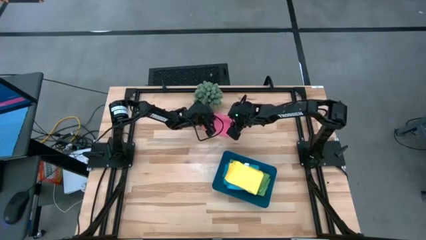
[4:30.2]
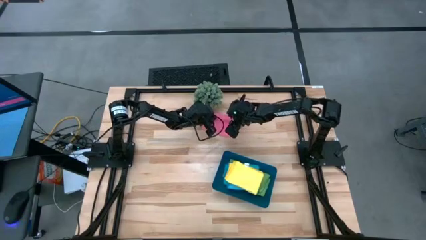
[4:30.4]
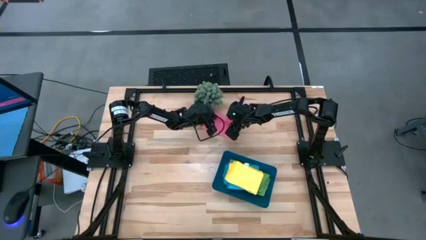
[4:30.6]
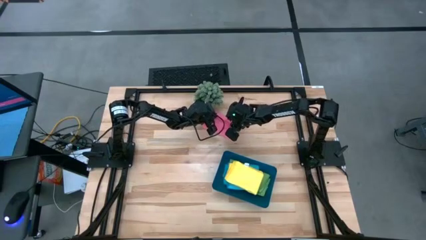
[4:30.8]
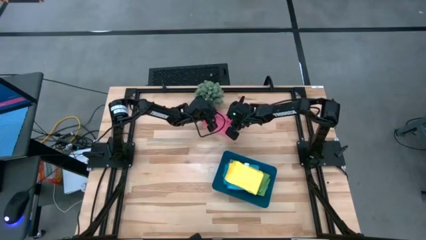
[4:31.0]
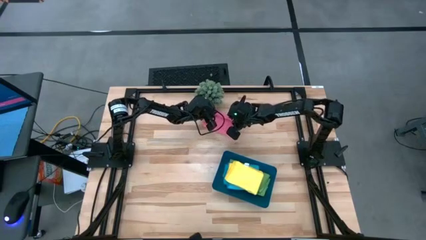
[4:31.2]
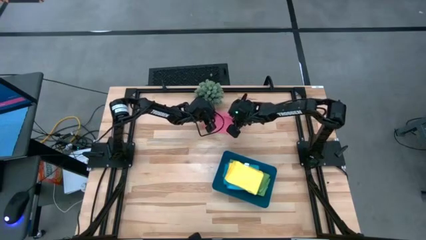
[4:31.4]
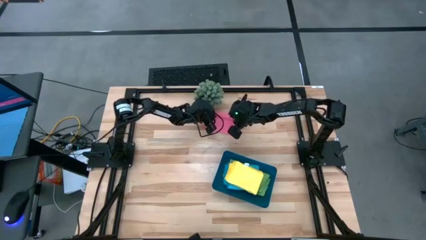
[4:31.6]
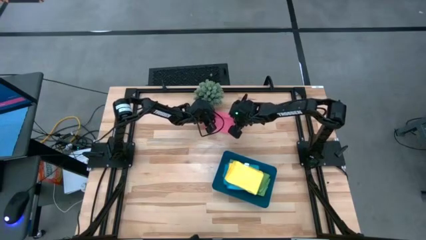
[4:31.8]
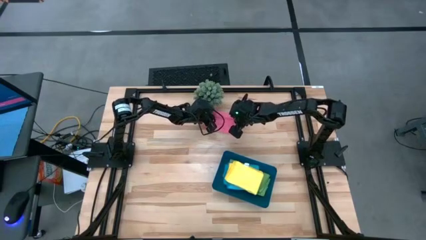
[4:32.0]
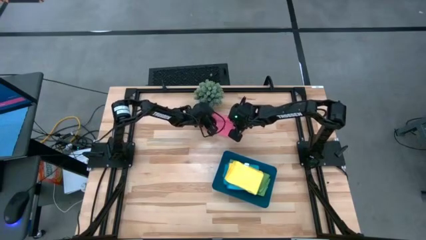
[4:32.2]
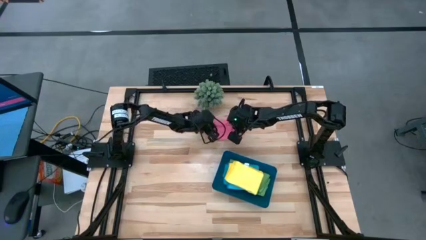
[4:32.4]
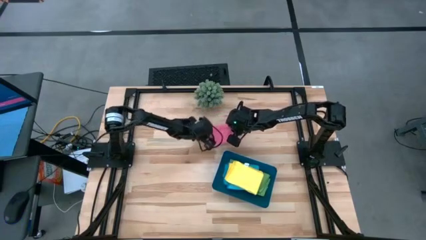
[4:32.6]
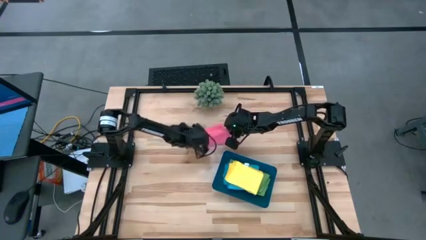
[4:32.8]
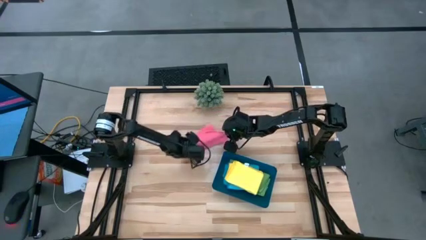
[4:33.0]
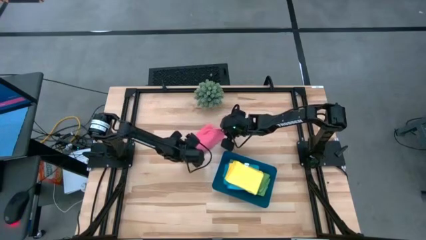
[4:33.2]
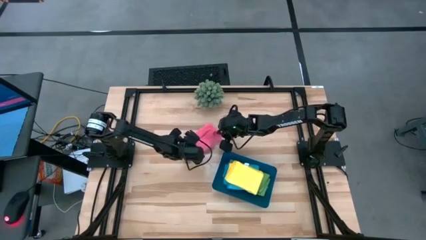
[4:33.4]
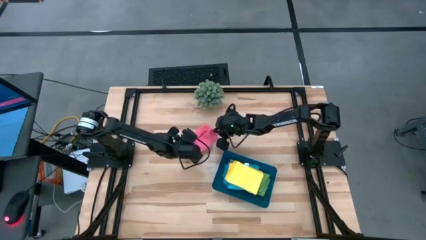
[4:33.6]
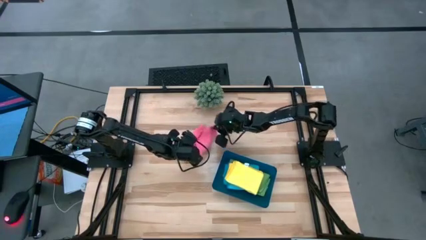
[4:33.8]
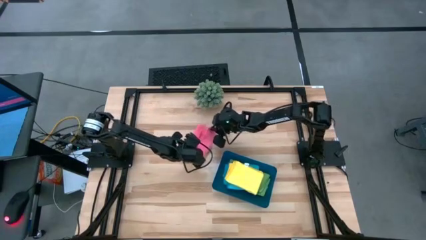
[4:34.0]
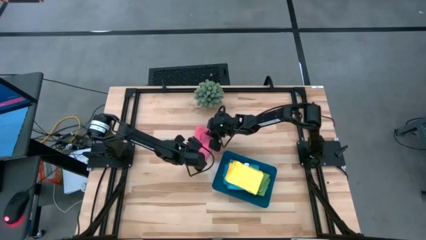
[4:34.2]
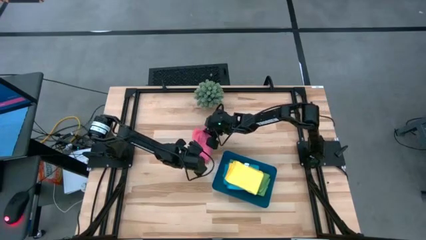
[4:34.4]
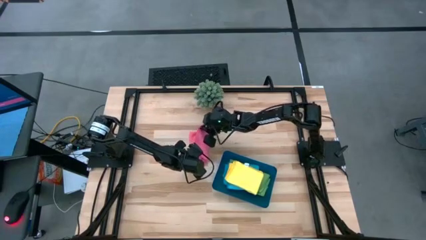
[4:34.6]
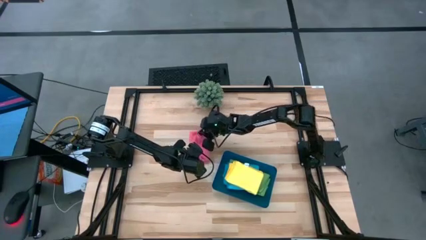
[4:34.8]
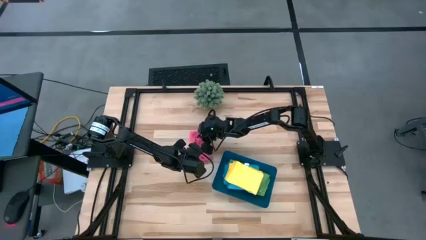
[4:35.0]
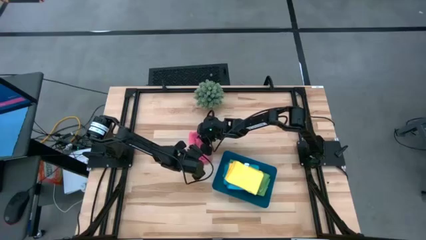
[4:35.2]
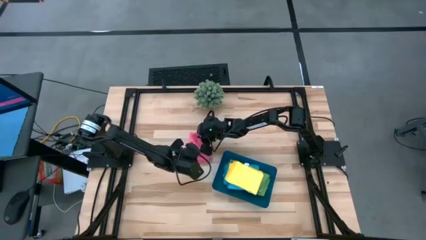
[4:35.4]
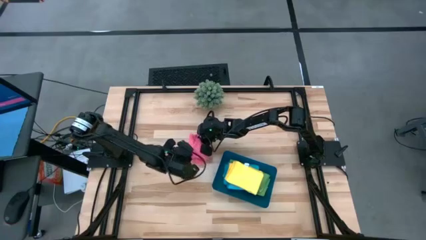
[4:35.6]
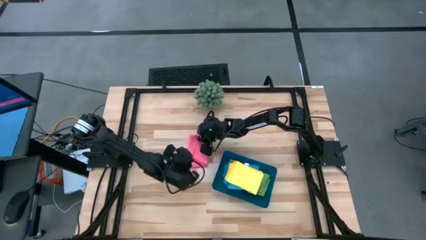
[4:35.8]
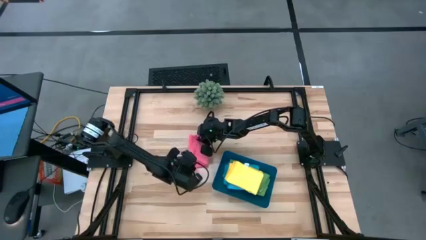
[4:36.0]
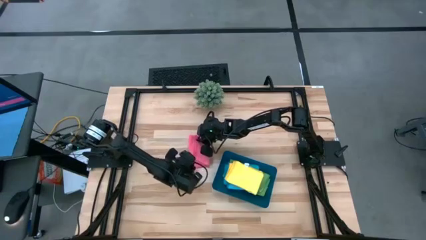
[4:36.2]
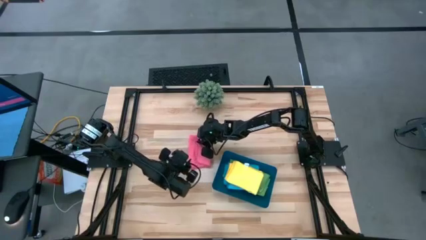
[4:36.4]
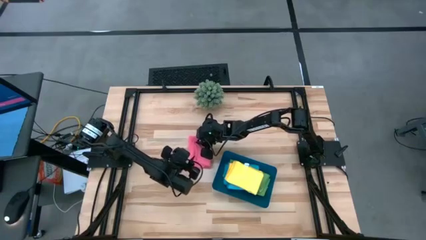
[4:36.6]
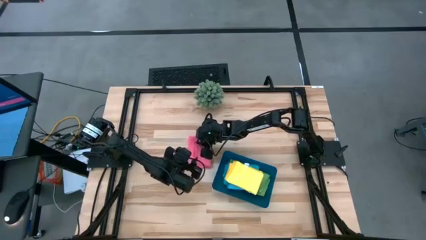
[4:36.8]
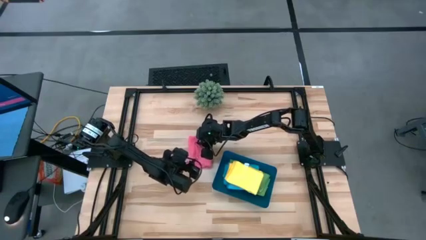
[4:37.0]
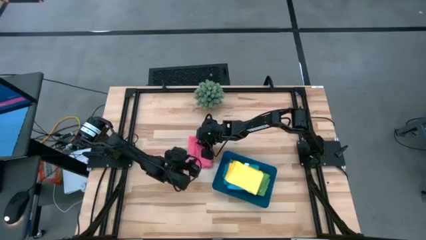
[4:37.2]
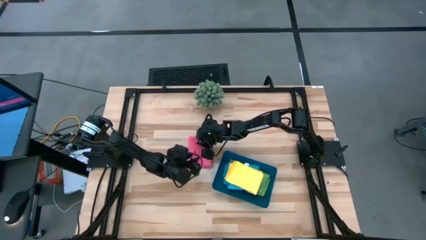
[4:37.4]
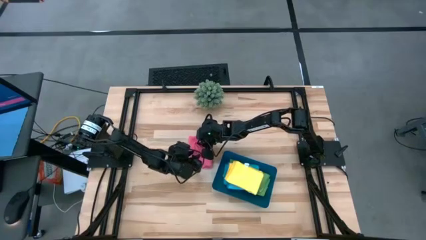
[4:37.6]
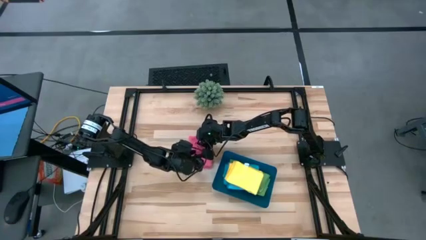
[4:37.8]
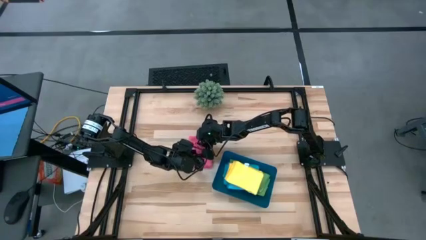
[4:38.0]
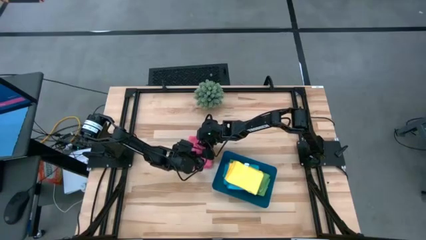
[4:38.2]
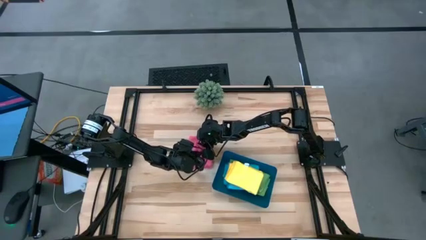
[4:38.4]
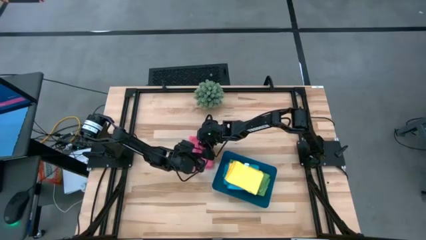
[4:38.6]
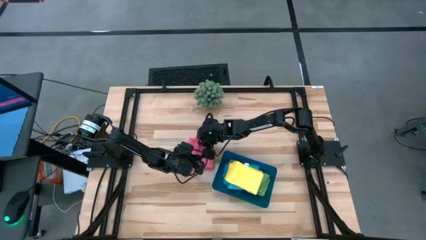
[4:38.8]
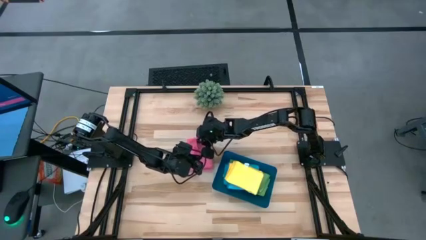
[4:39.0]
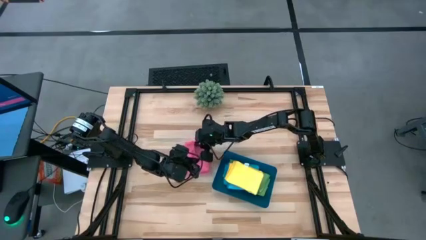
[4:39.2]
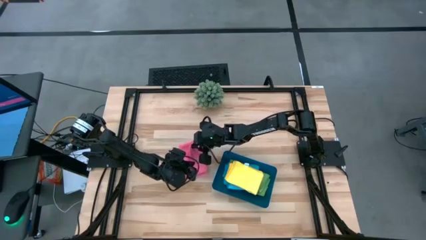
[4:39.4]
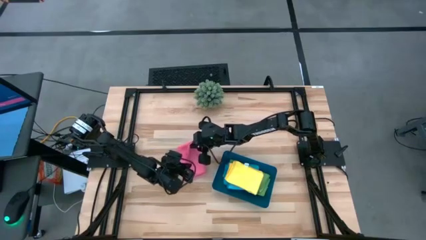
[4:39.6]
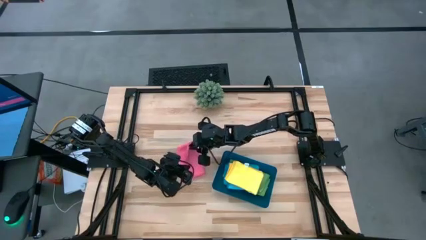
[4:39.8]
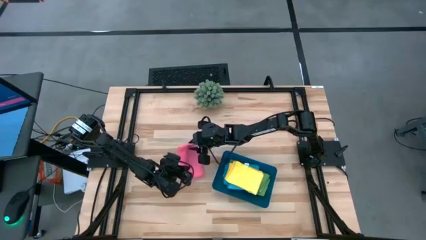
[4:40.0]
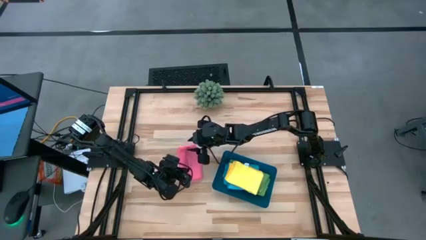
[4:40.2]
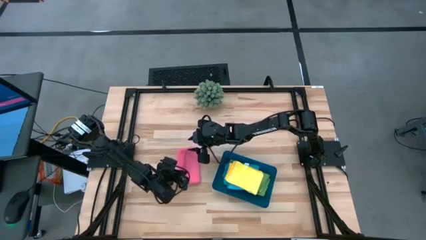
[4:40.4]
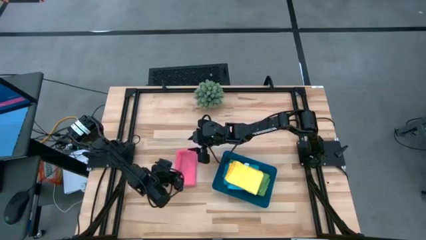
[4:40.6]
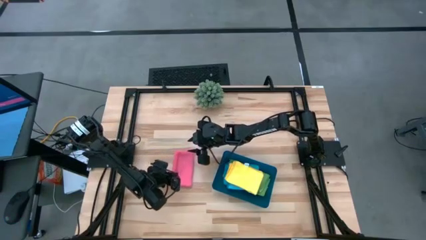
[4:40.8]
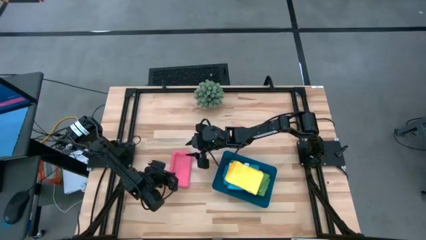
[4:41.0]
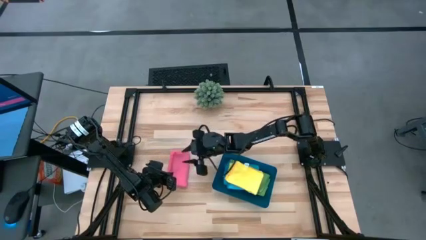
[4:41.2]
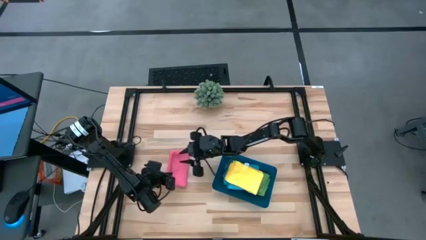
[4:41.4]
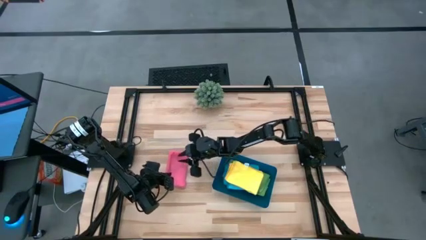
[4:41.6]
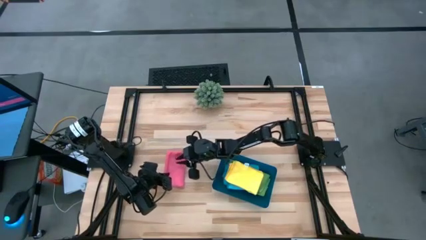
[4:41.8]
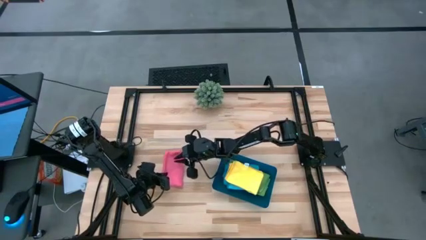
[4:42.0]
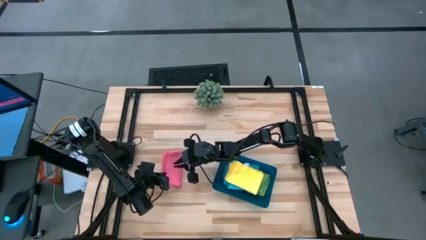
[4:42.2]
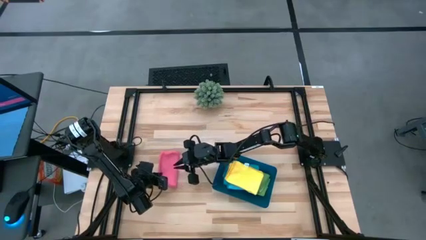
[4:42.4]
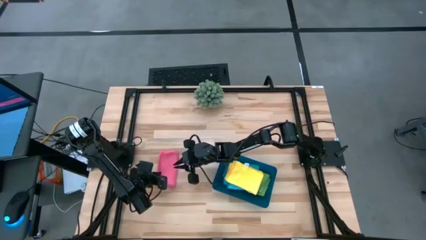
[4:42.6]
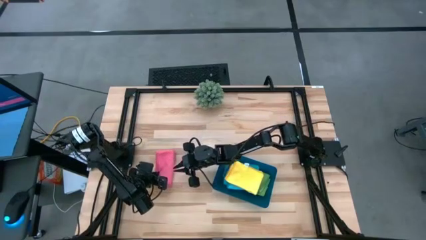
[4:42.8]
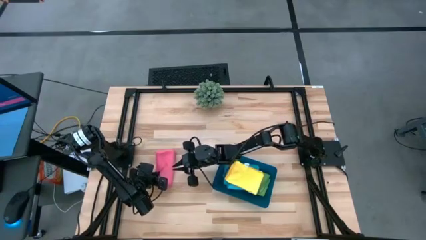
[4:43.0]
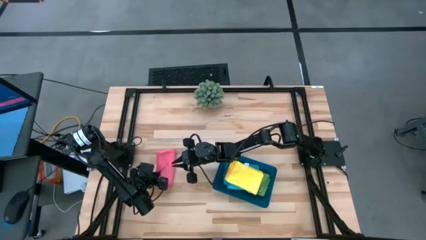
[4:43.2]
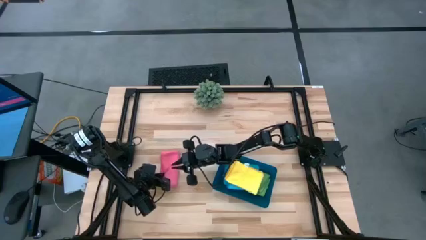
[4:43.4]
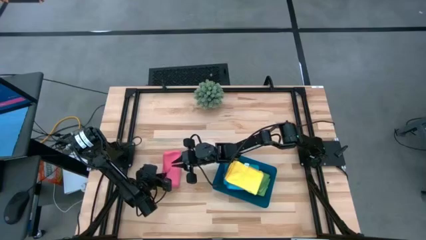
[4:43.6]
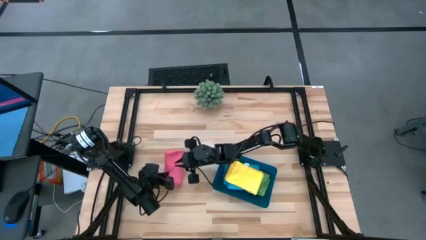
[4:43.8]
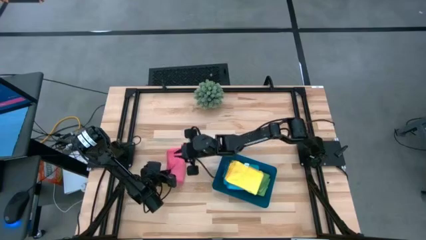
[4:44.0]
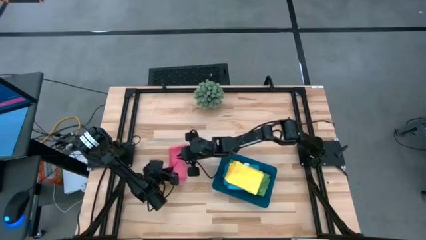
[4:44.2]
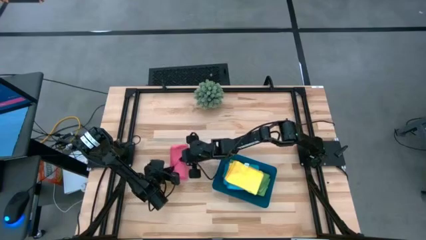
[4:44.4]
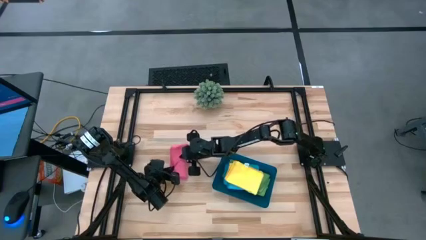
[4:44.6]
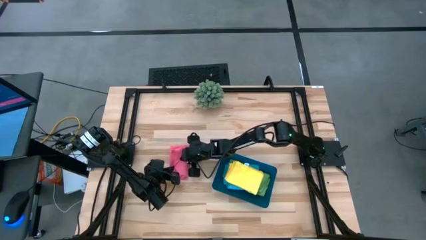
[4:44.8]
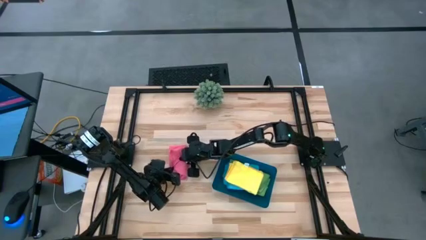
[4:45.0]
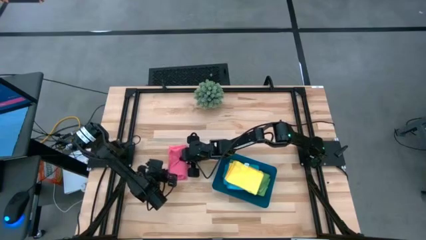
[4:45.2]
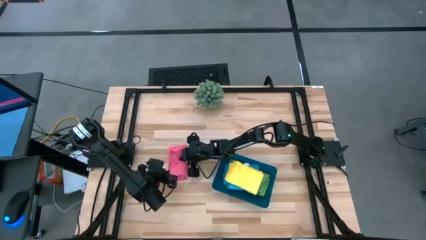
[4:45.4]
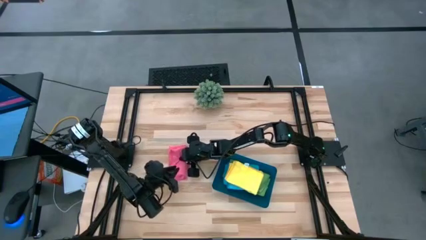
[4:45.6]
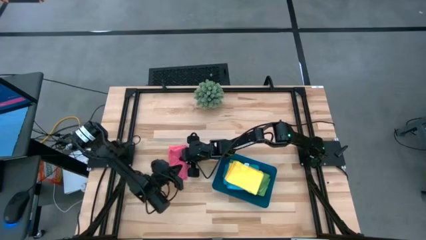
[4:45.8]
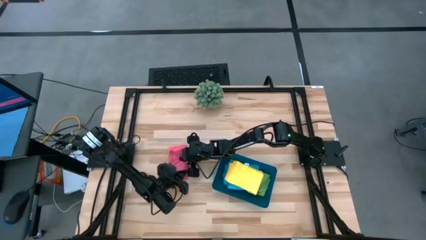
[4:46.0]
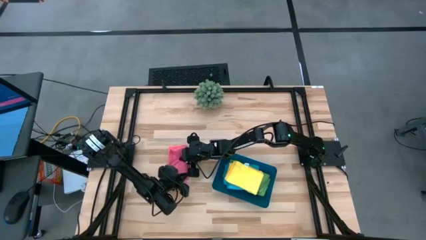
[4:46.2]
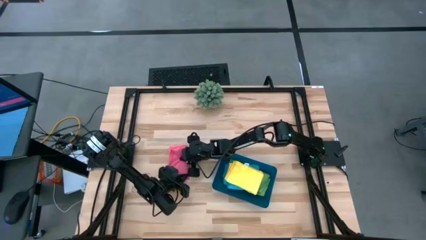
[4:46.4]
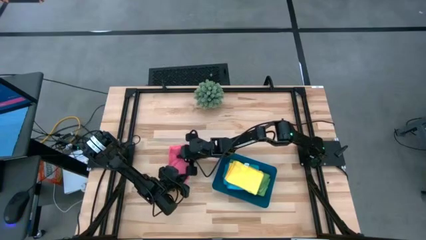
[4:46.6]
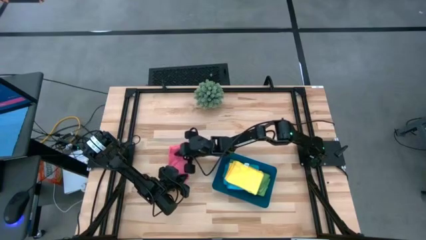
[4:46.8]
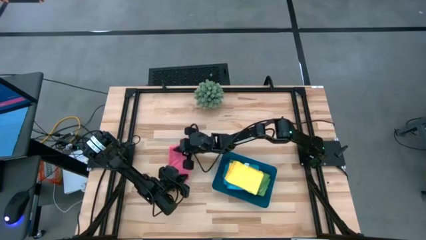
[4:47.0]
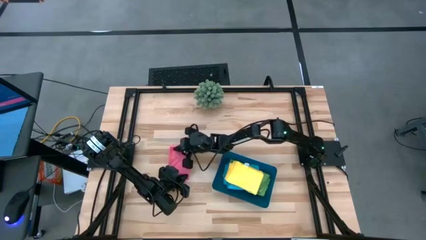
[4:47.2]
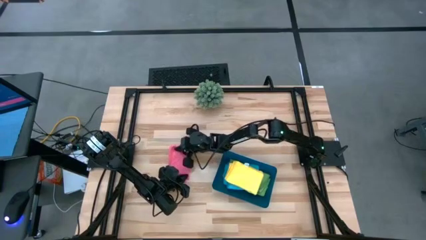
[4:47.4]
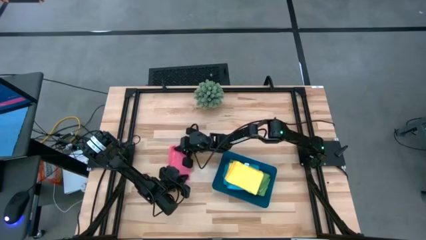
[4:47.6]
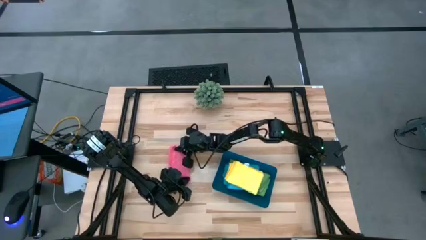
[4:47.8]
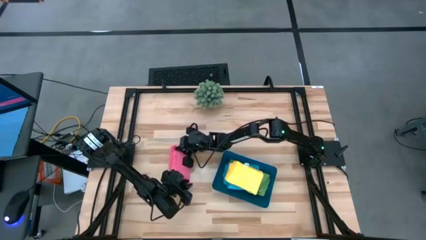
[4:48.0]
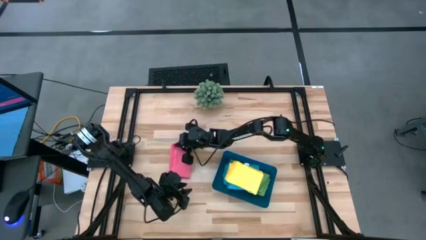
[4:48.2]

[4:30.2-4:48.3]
Task: Fold microfiber towels
Fold the pink microfiber towel
